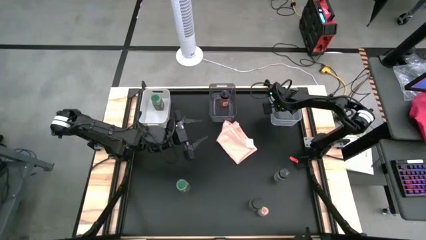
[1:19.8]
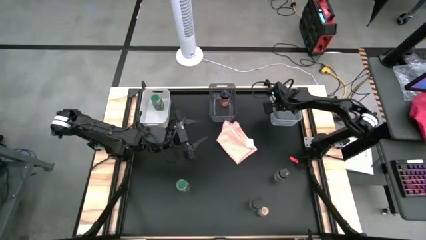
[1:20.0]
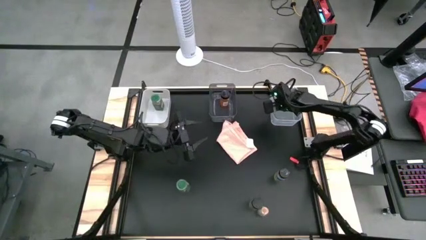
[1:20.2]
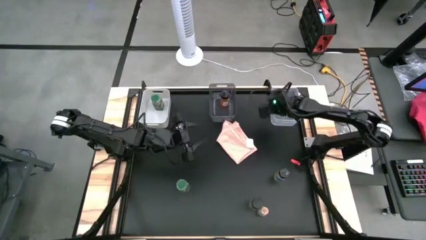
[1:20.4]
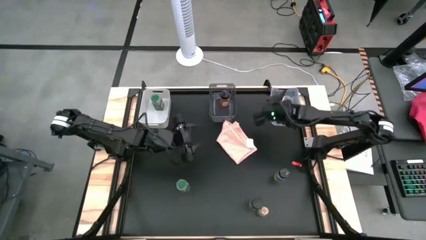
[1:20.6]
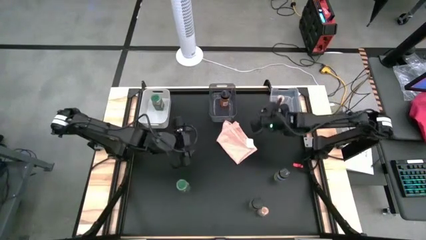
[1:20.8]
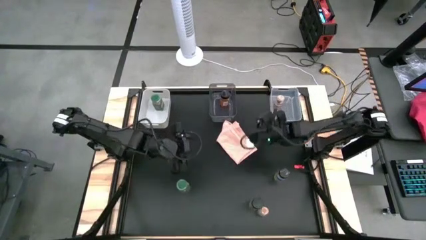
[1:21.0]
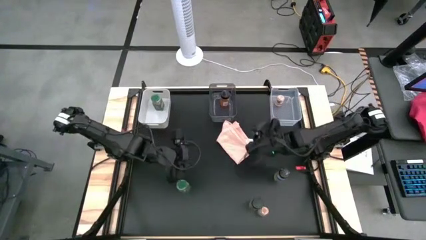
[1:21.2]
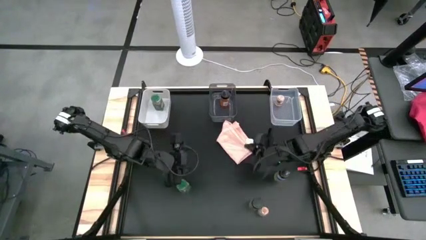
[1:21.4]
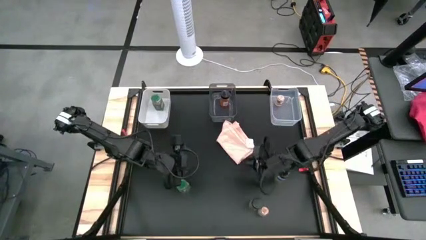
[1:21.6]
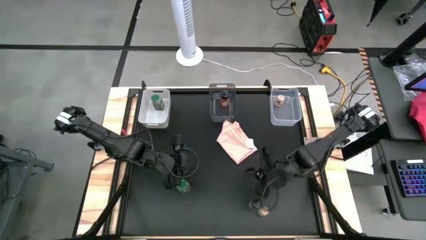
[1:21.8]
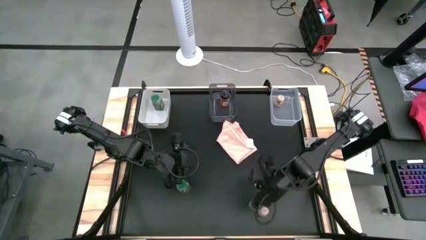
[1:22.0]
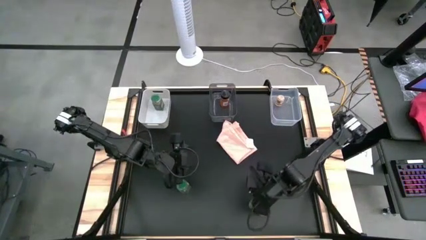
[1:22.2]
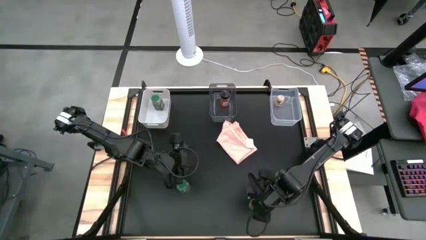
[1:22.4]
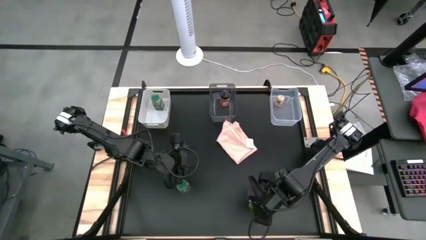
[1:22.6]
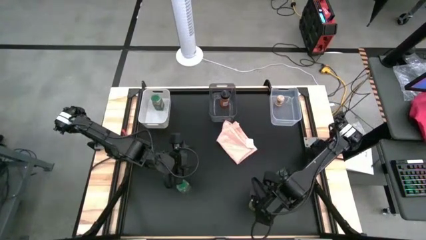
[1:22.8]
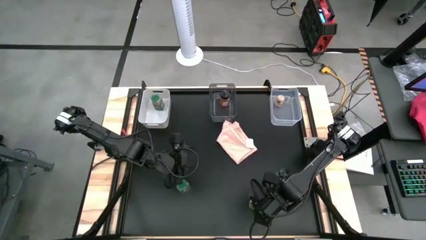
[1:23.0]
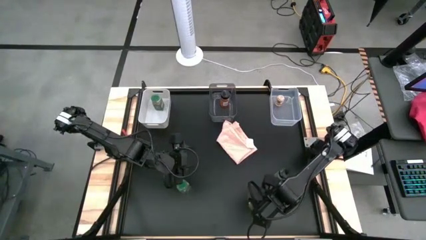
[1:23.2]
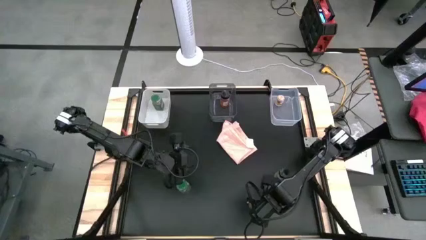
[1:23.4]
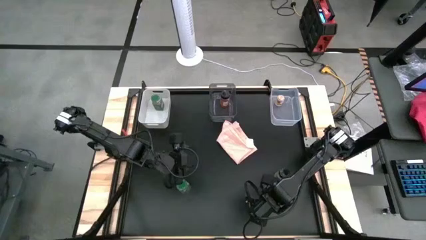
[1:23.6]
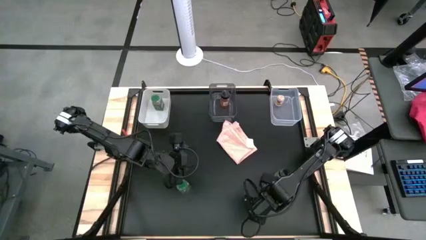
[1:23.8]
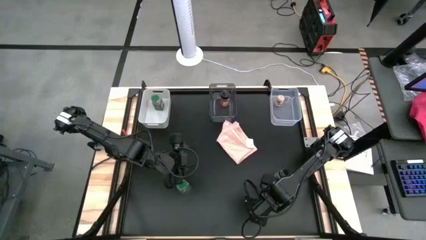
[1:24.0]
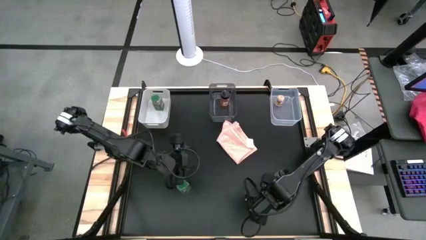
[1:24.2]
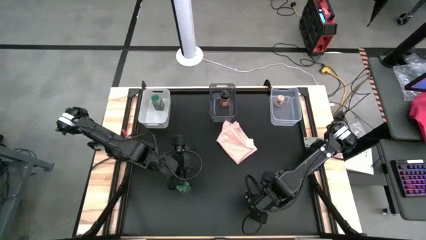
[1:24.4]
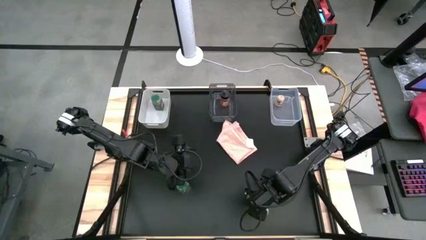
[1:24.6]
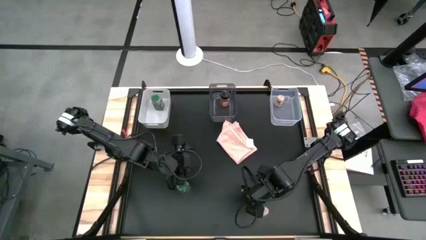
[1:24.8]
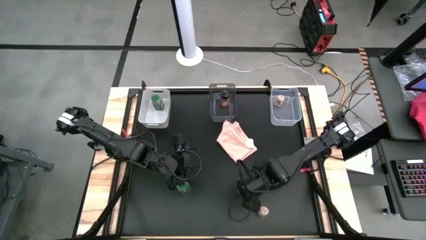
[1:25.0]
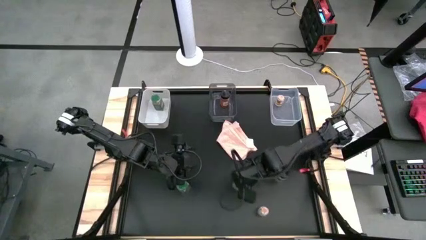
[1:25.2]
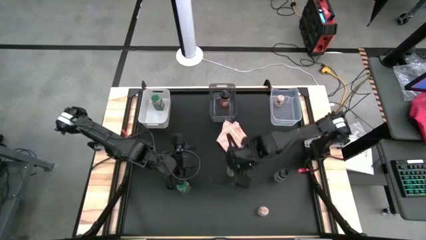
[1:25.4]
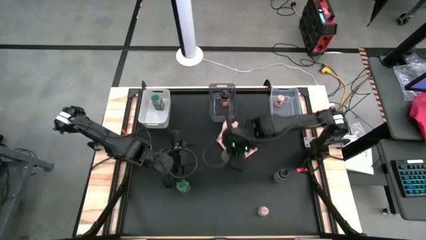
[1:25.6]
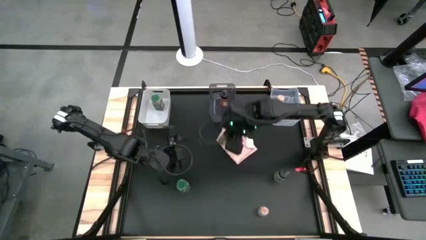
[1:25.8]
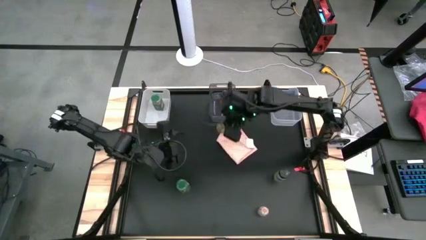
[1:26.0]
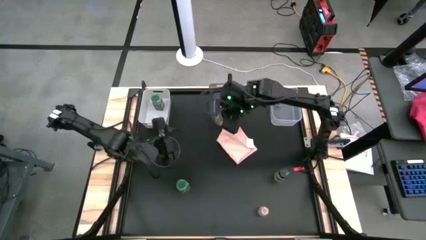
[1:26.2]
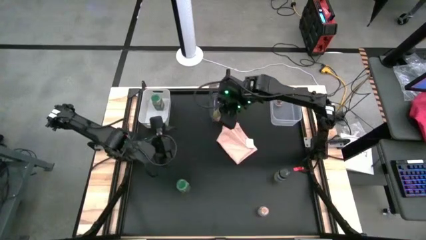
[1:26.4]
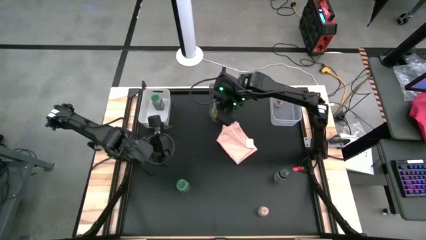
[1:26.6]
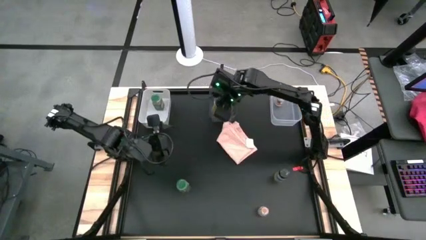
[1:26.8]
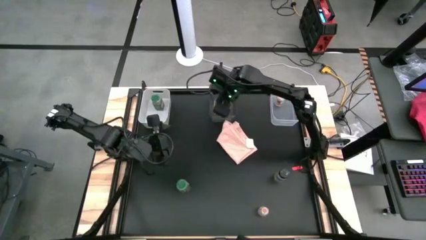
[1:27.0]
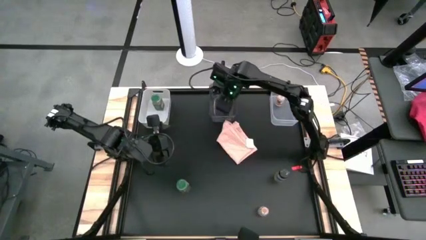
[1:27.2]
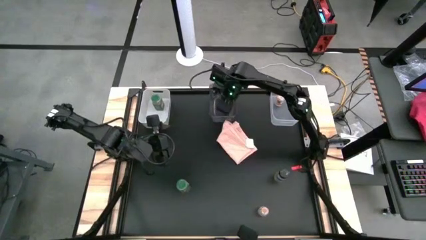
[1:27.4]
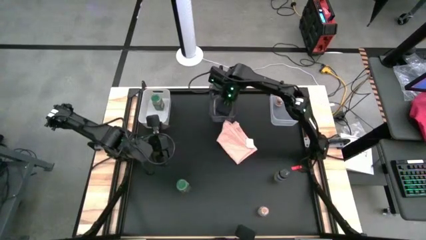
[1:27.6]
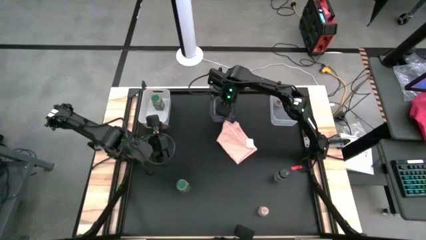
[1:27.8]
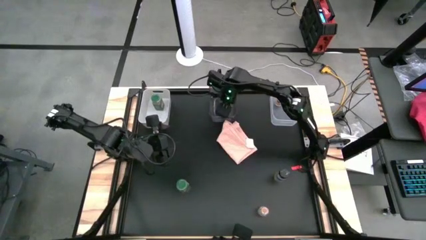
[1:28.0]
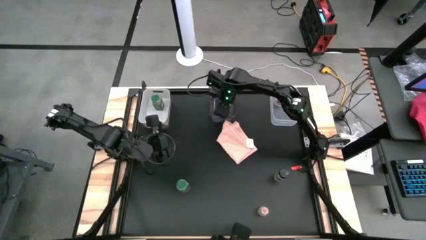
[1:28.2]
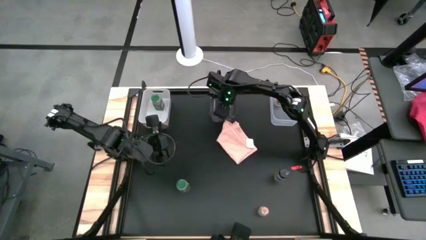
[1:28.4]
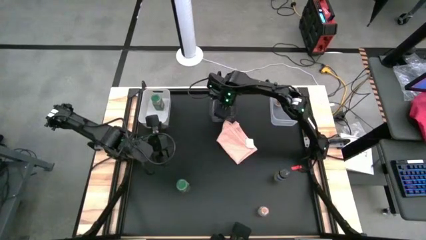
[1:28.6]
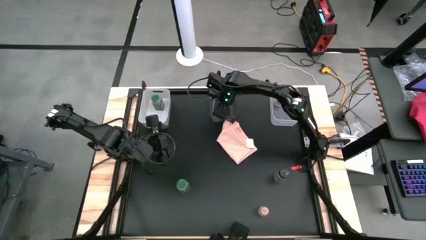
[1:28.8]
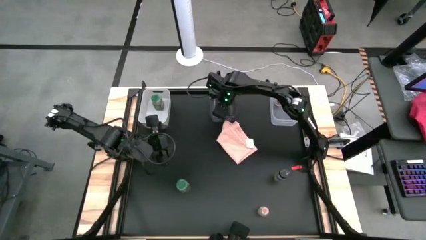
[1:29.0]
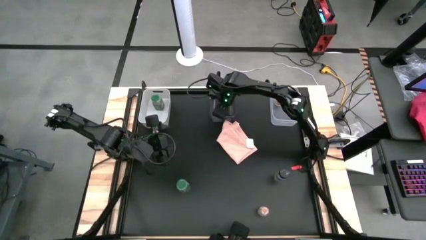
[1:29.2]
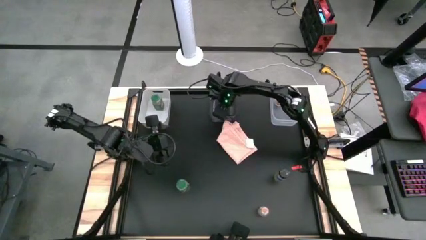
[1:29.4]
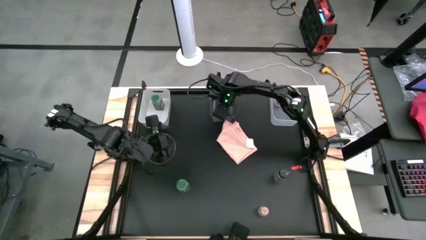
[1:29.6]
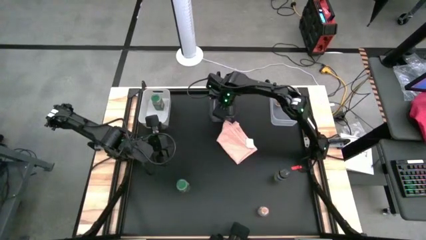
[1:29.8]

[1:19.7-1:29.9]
Task: Sort spices by type
Put the bottom black seasoning bottle into the black bin
